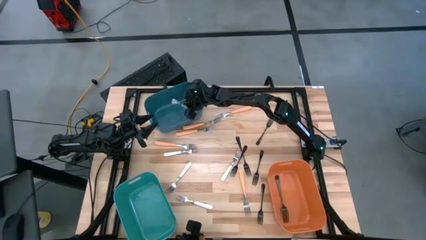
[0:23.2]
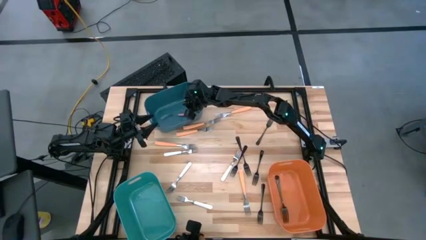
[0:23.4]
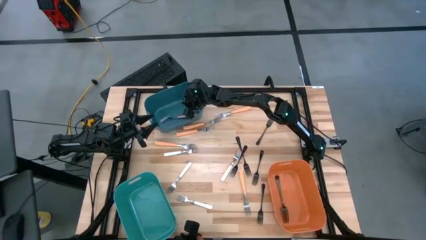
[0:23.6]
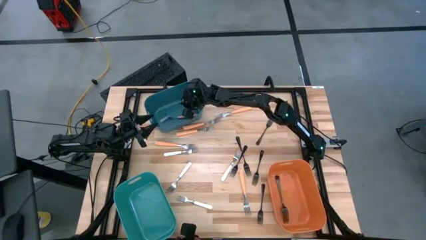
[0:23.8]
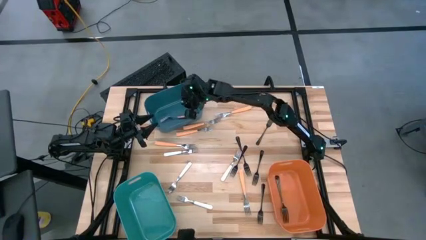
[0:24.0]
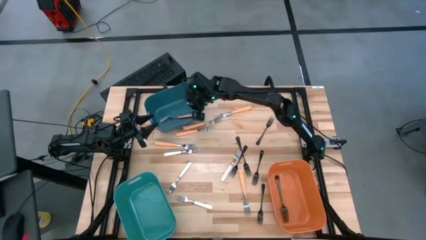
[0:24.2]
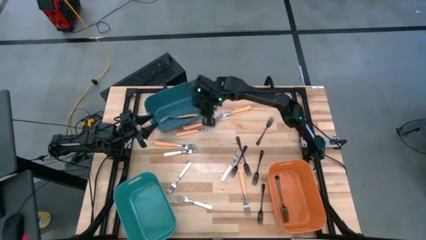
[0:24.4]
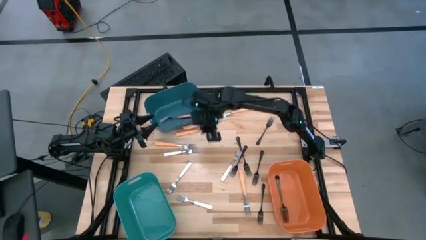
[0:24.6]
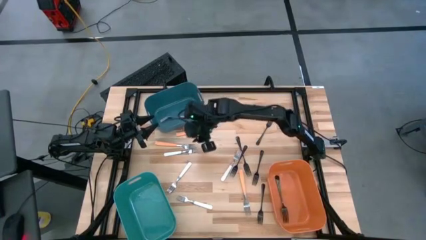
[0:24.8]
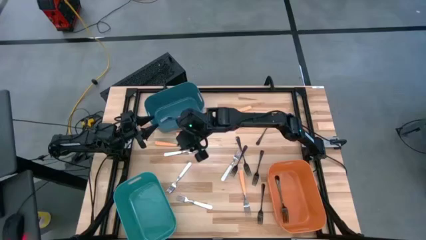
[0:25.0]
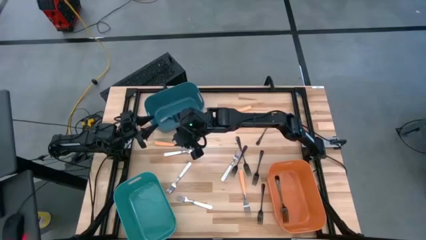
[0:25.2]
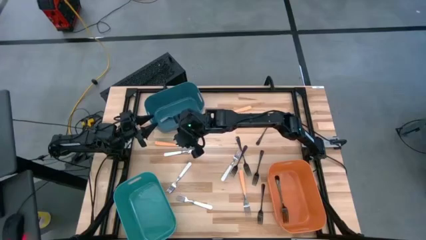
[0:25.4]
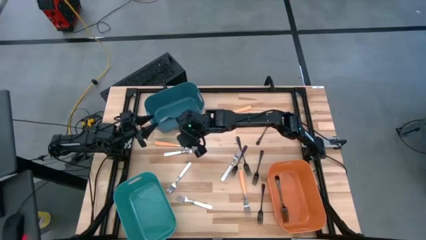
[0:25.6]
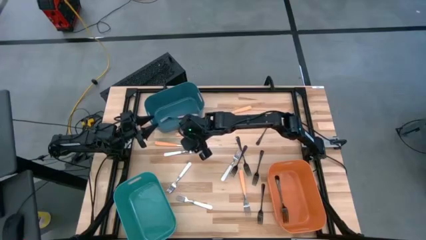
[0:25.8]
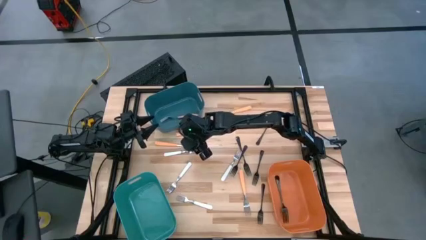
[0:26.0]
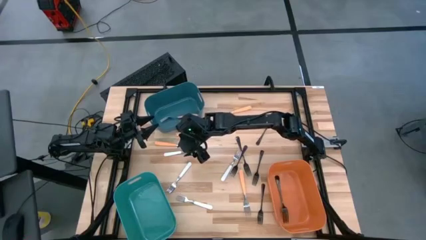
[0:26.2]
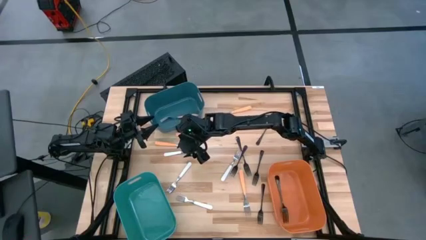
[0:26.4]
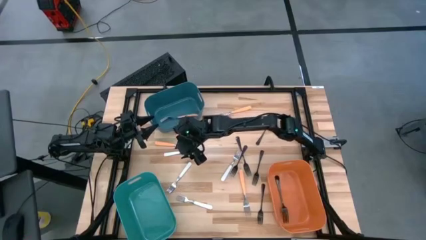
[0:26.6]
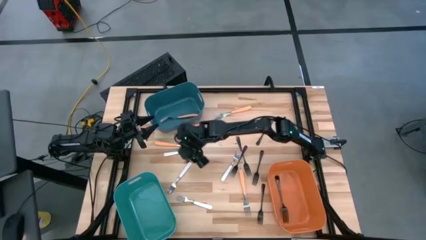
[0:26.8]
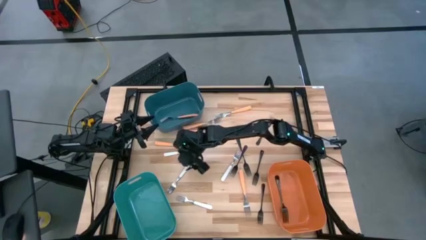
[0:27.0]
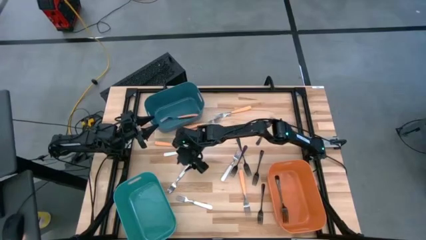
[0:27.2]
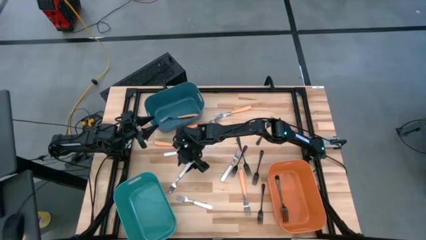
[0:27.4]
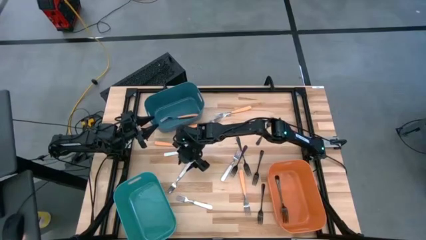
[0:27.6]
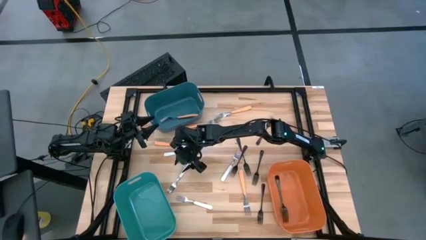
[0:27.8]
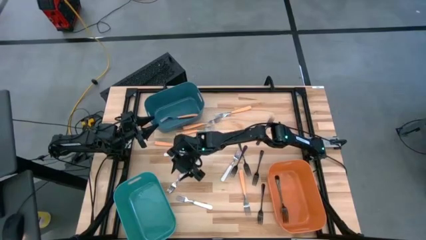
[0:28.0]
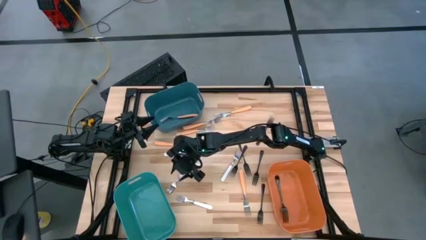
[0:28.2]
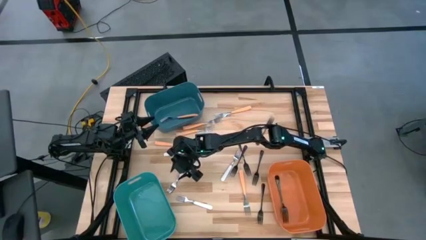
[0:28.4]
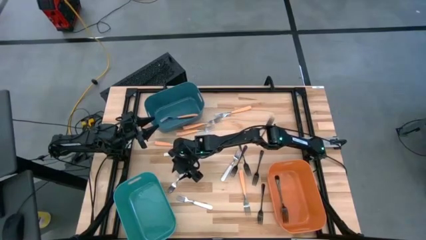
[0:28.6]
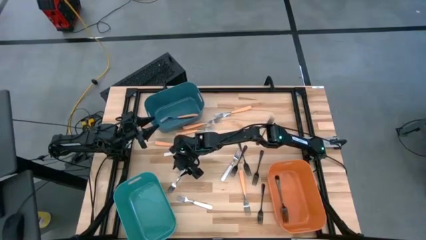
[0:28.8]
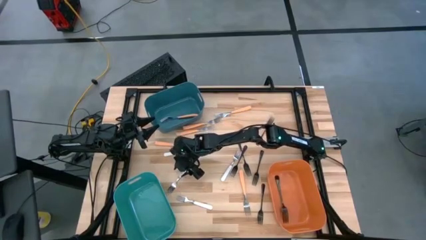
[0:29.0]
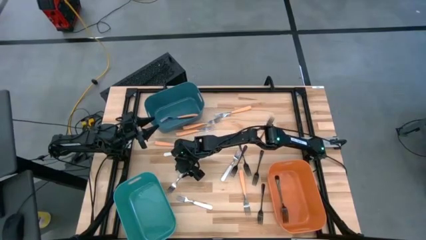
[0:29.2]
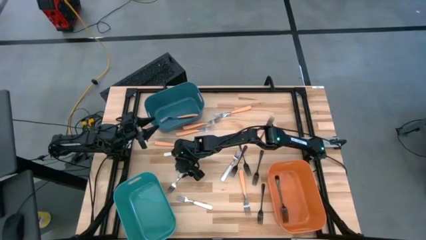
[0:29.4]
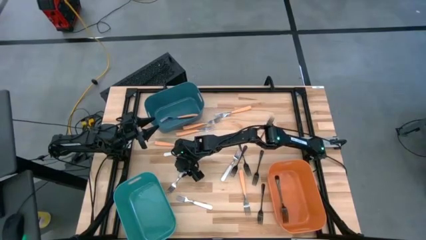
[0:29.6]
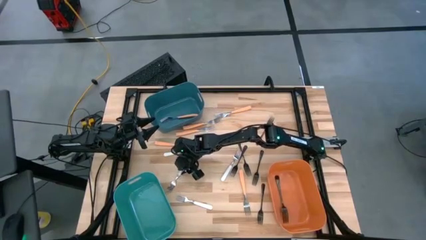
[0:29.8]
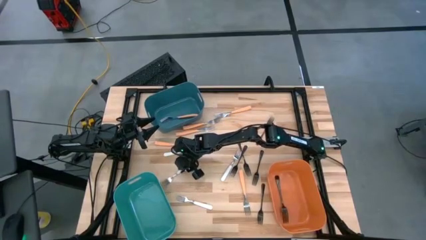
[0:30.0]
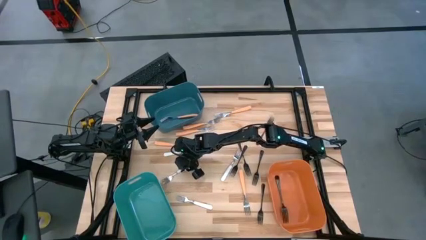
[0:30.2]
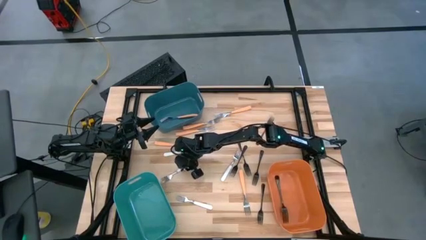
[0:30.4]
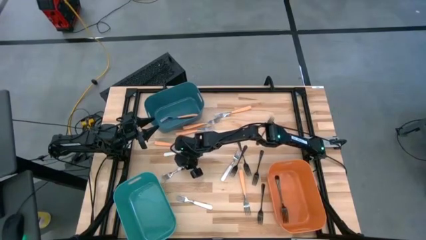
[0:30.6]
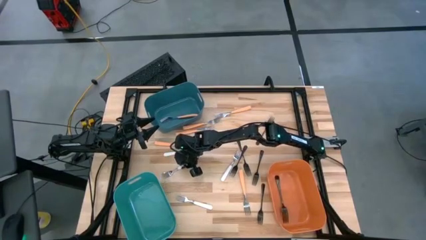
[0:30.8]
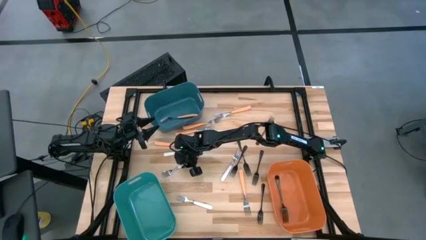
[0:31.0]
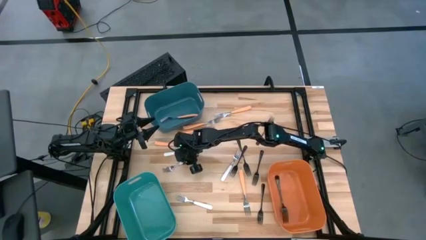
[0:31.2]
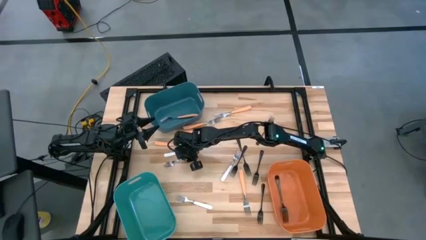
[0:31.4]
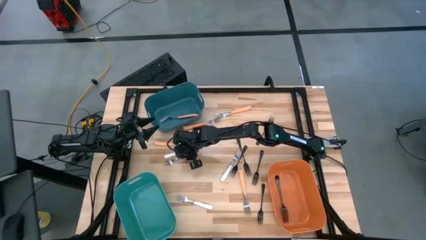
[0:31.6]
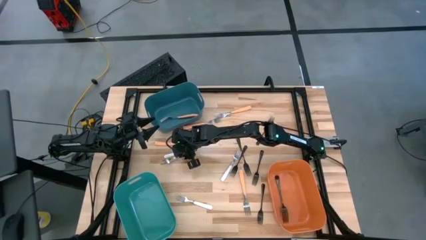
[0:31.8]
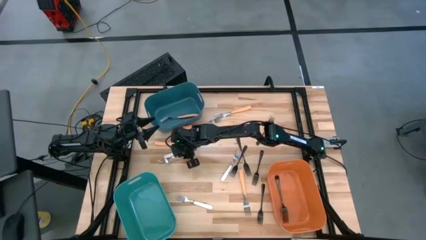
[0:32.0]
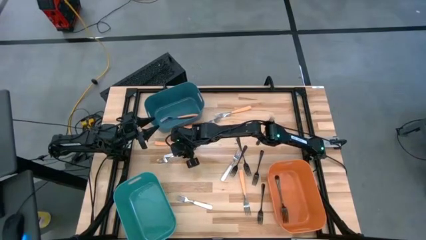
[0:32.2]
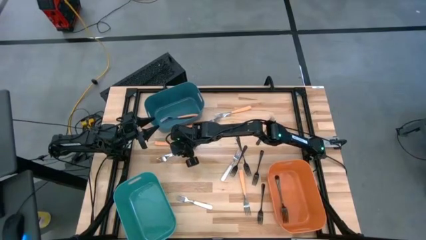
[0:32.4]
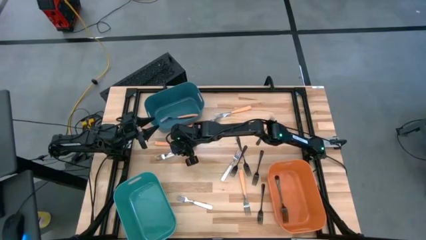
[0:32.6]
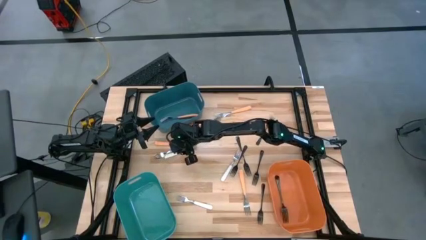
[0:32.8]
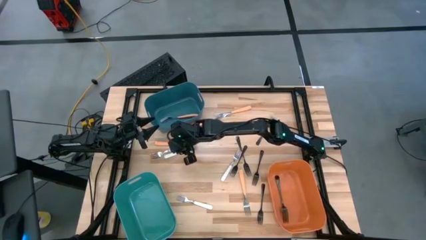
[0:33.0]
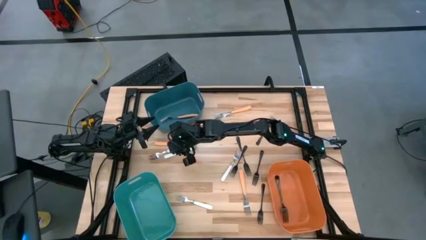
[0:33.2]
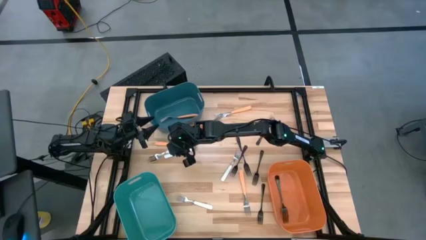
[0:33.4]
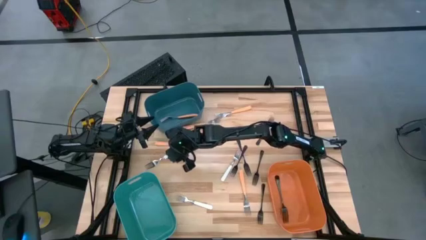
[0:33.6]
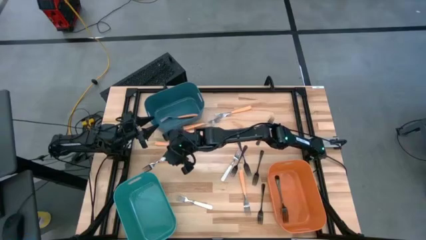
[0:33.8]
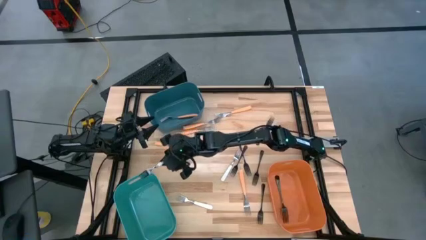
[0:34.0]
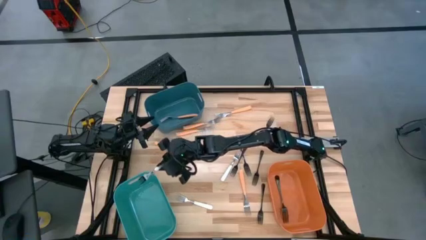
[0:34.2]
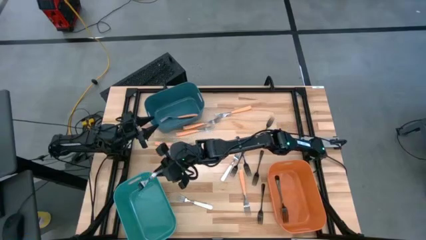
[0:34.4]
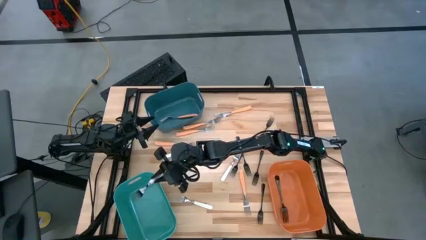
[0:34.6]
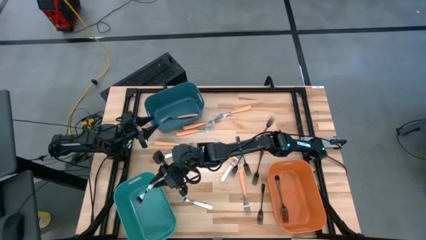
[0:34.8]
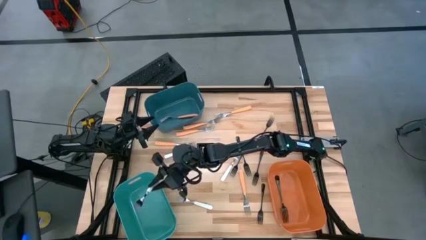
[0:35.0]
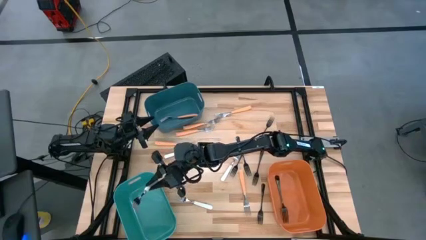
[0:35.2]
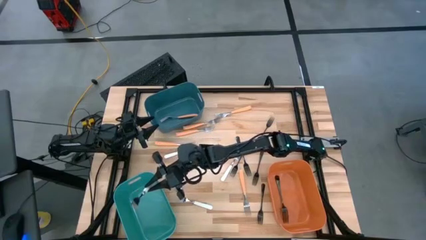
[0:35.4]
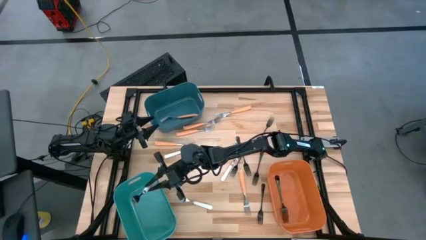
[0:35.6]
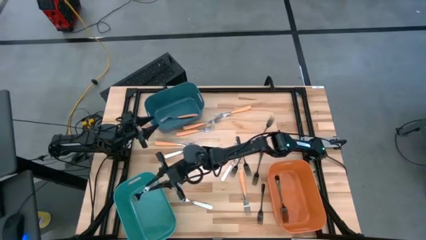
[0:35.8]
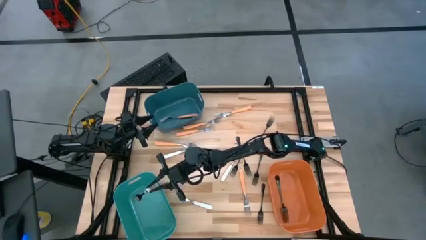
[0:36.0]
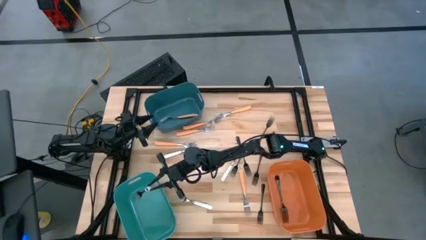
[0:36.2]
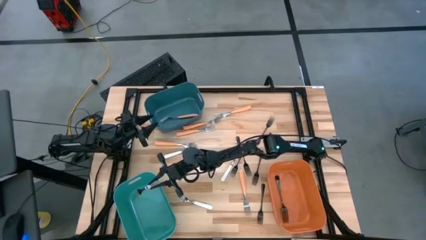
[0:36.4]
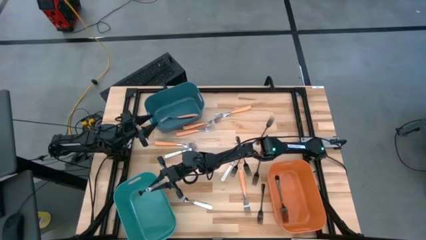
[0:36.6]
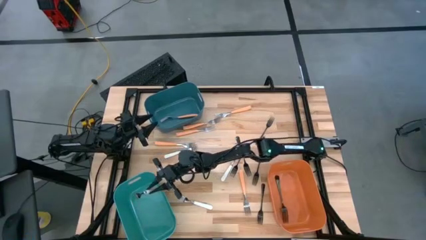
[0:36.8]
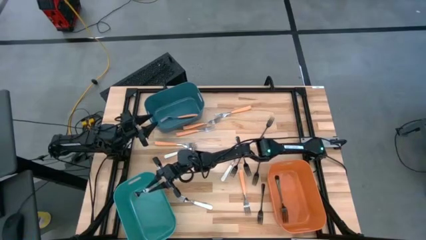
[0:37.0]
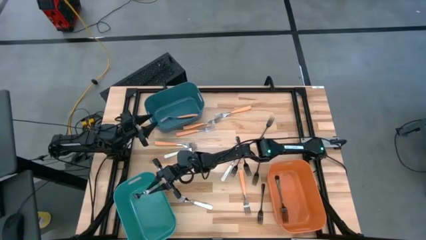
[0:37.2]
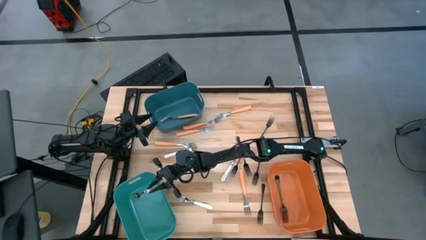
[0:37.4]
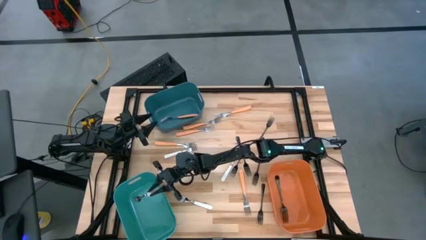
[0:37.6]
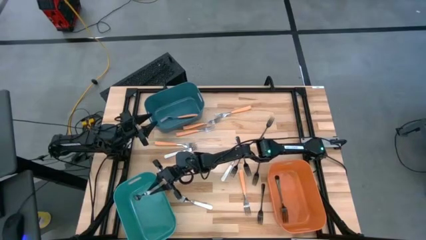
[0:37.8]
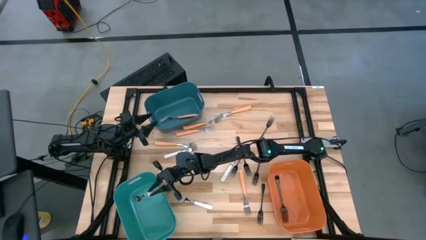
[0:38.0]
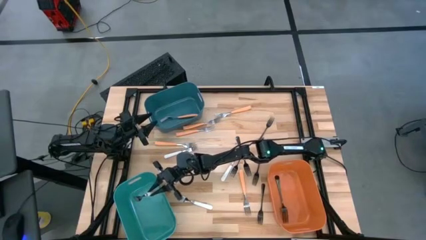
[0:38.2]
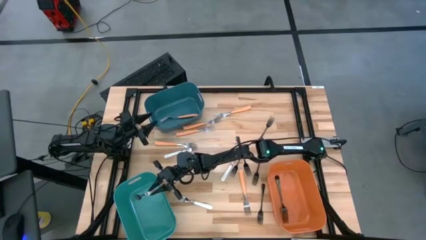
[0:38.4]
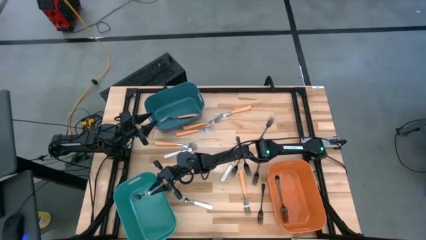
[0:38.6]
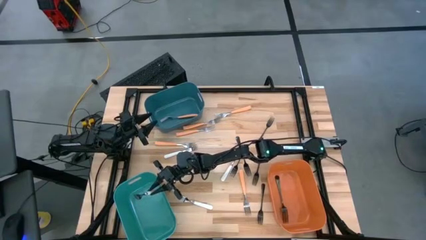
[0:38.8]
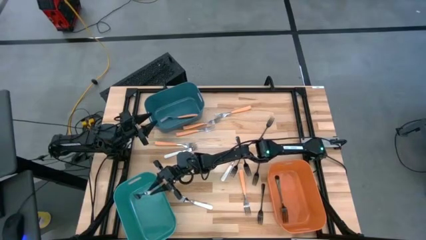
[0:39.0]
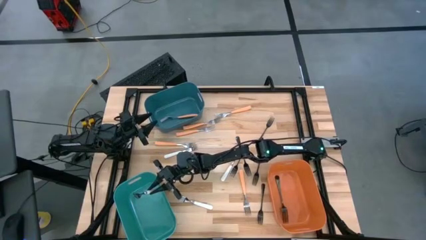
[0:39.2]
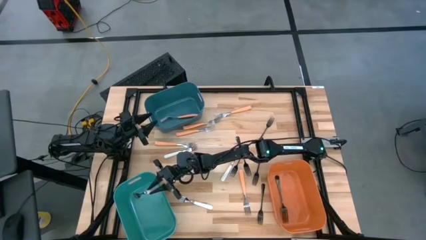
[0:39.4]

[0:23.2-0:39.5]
Task: Sort silverware by color (type)
Put the white fork into the green bin
